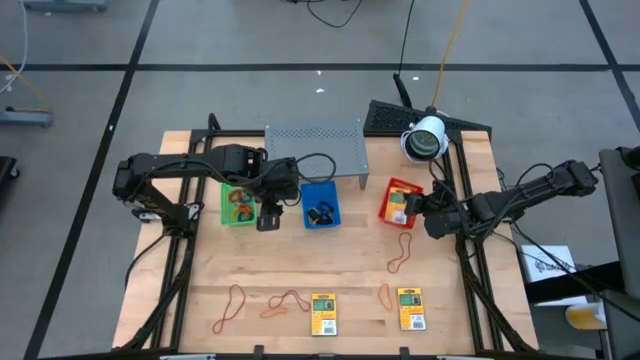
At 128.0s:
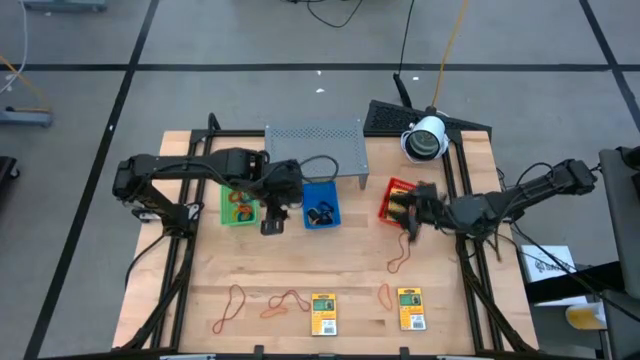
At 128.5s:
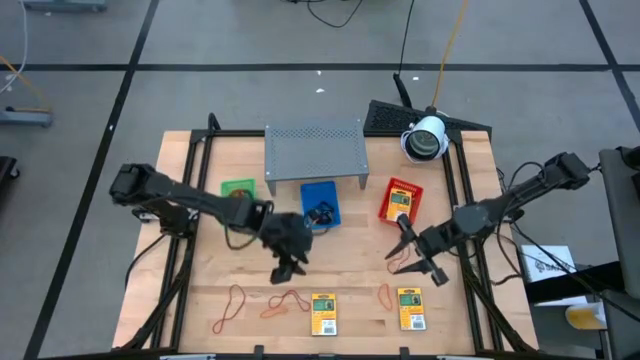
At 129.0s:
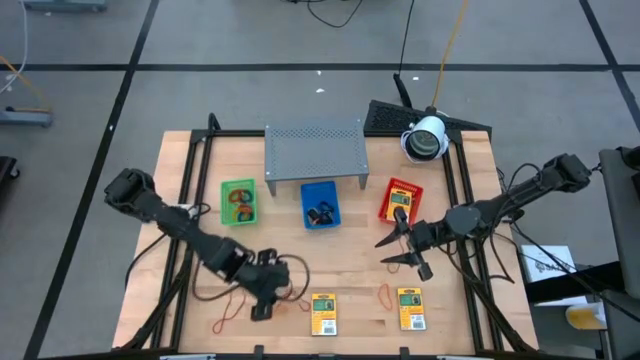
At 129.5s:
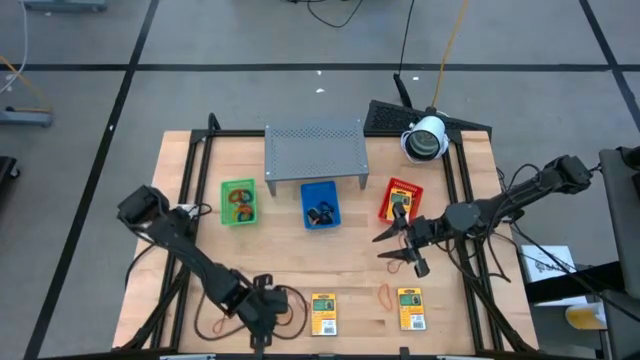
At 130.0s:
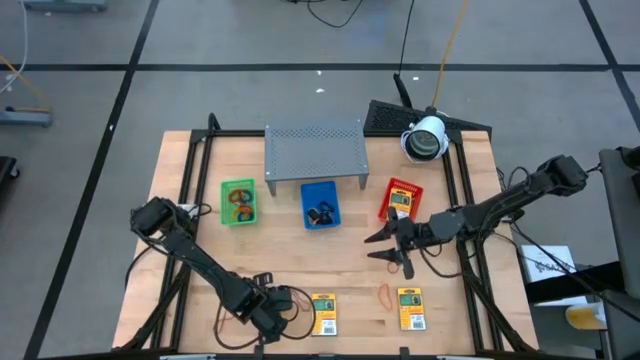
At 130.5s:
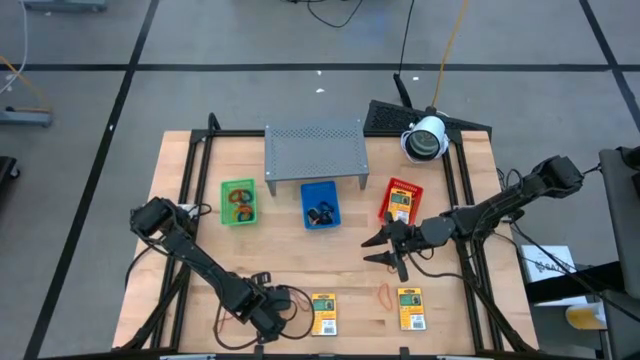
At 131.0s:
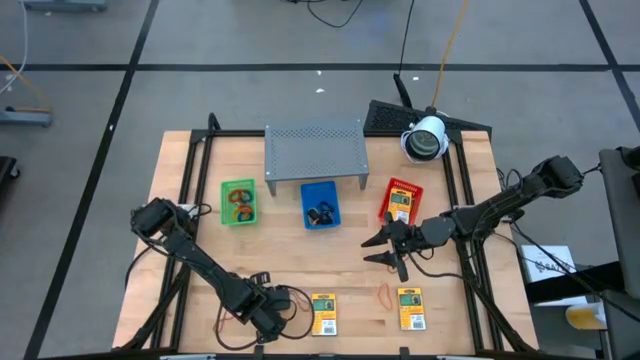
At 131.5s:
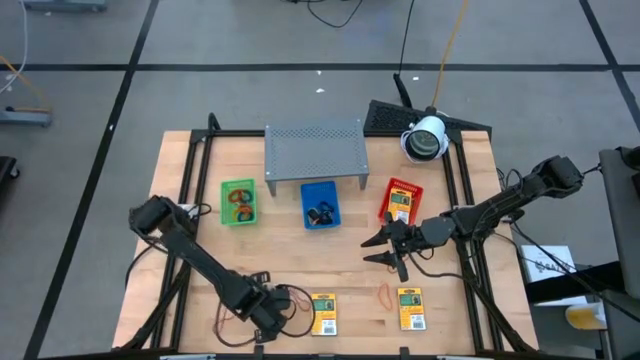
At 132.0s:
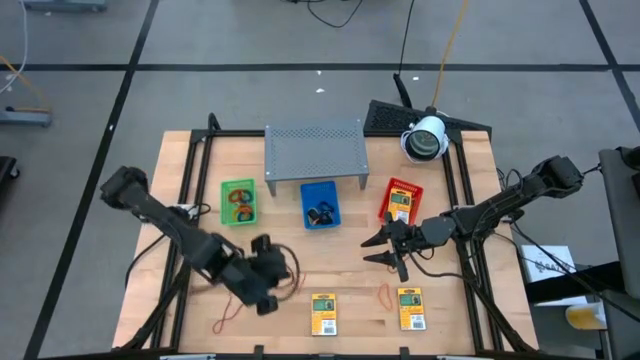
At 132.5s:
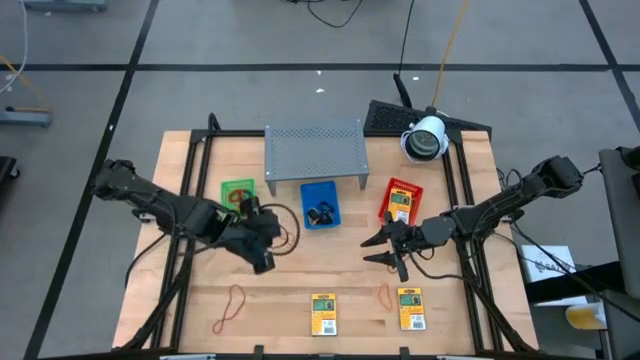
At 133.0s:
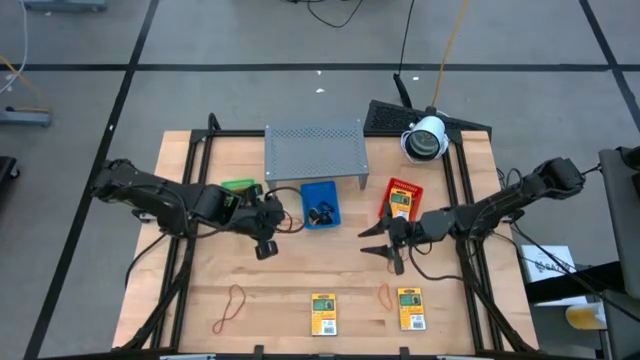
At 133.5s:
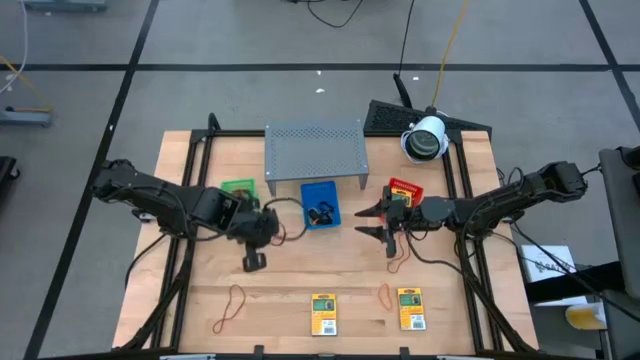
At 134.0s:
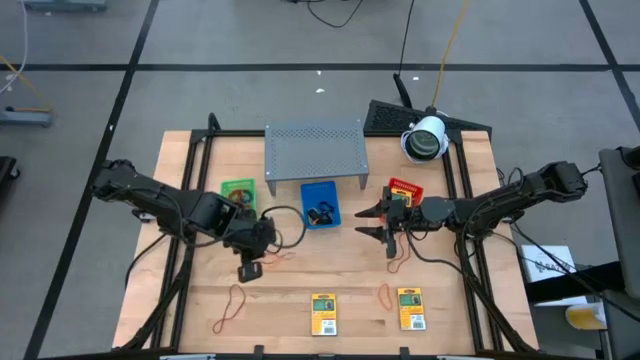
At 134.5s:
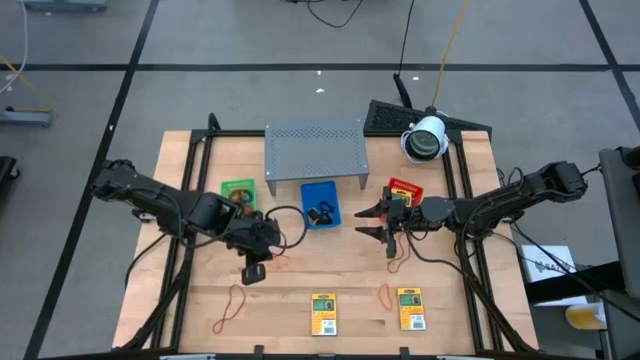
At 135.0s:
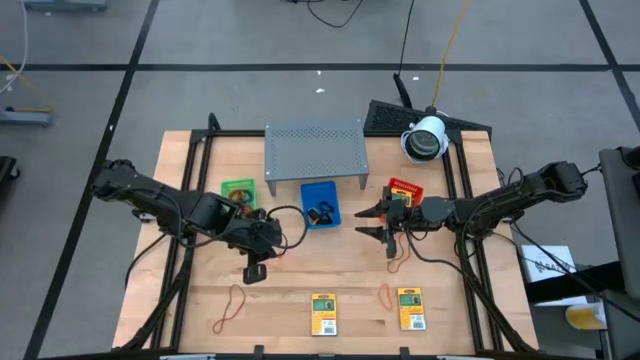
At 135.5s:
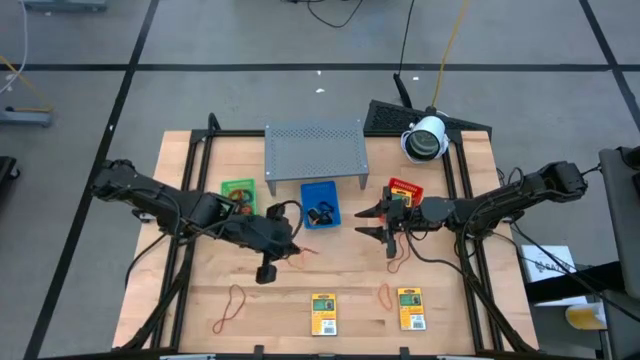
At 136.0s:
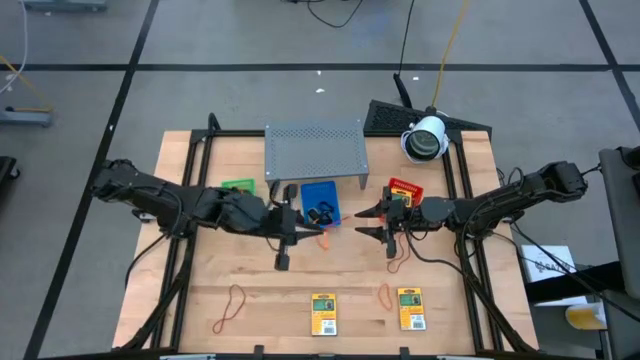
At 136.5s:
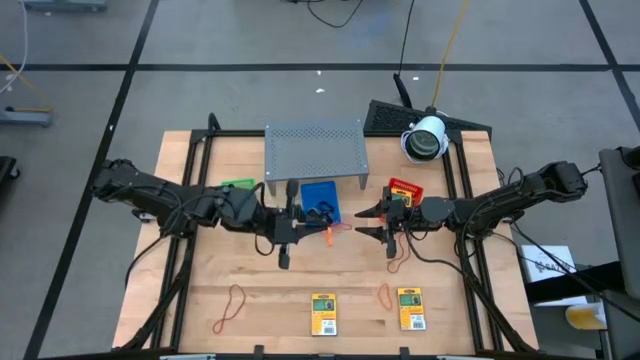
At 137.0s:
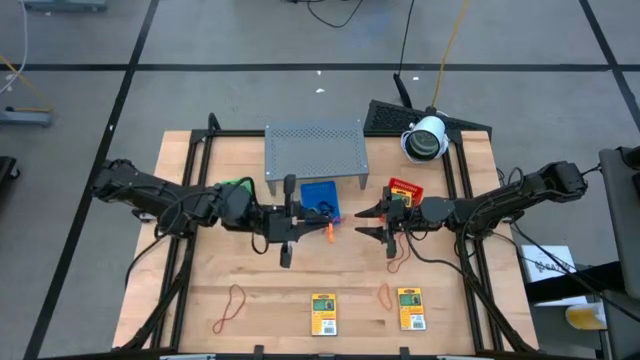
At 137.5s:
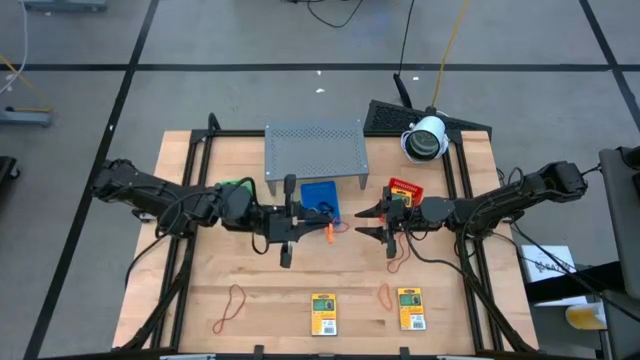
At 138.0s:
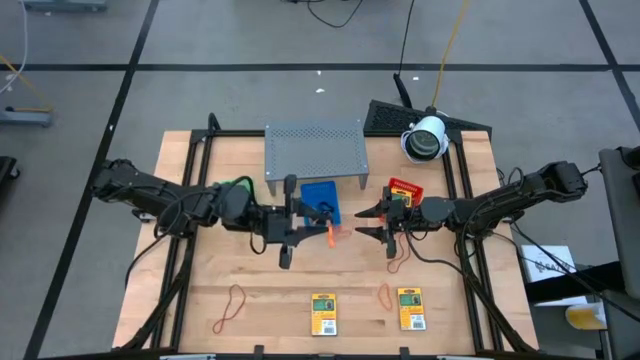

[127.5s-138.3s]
Task: Pick & Place Office Desk Supplies
Put the orange rubber band into the blue bin

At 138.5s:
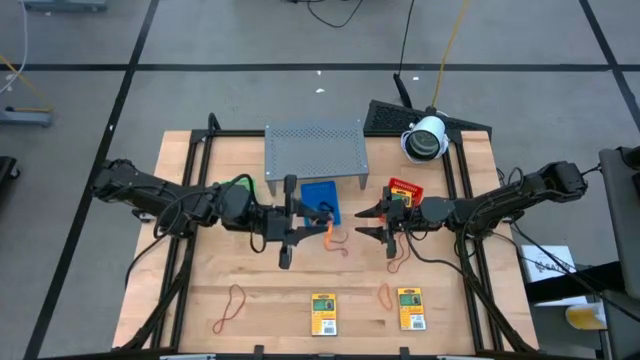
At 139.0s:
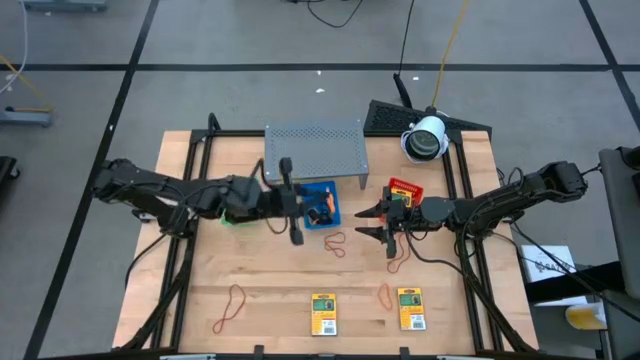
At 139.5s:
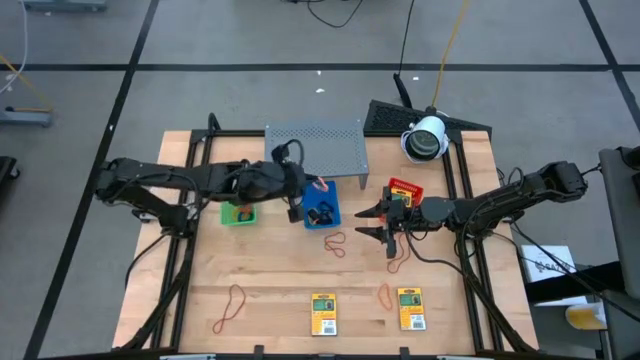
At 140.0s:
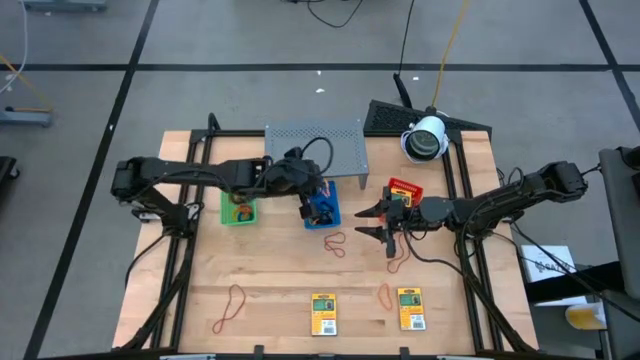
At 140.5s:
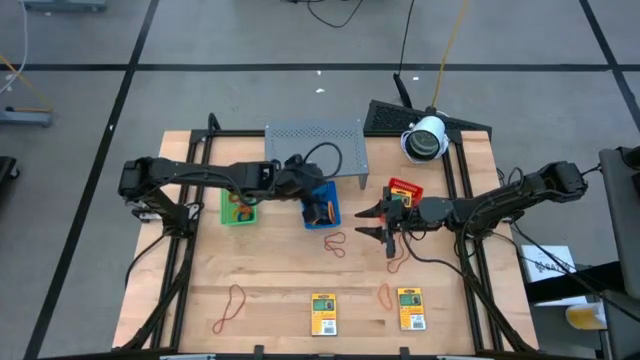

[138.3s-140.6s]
Put the orange rubber band into the blue bin

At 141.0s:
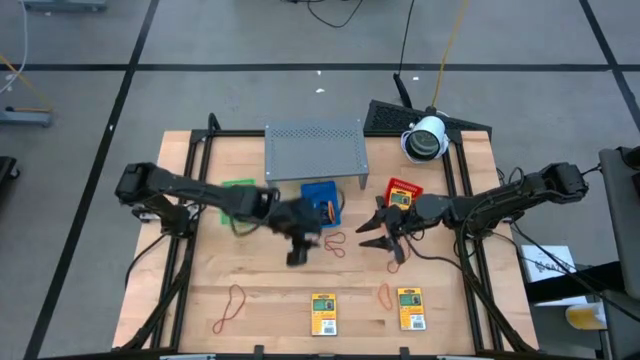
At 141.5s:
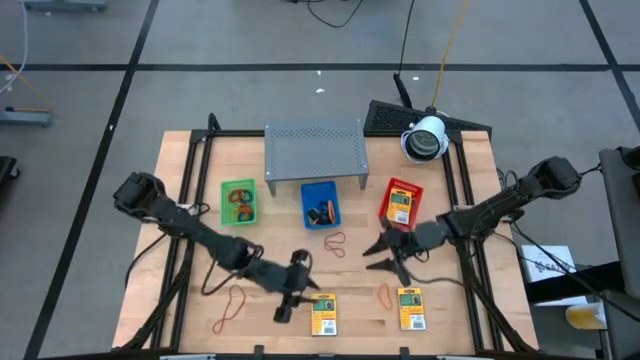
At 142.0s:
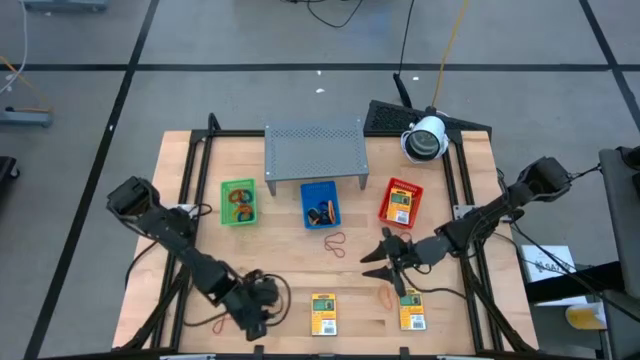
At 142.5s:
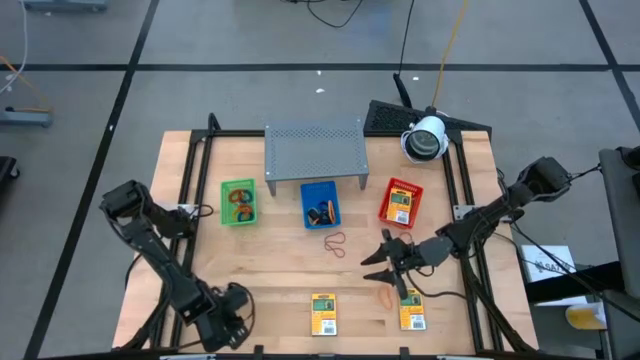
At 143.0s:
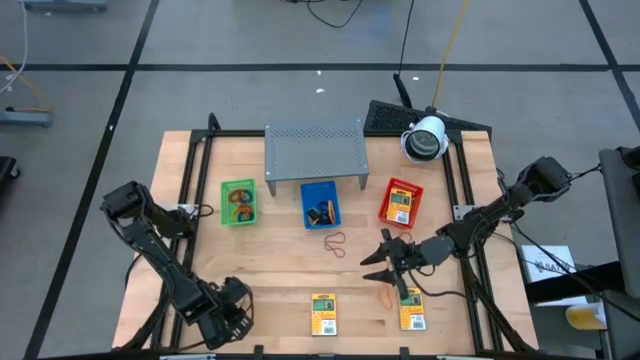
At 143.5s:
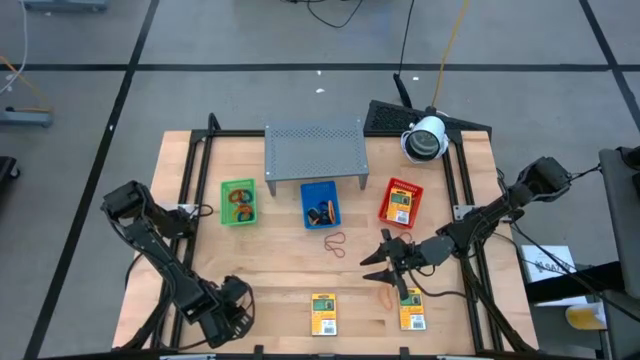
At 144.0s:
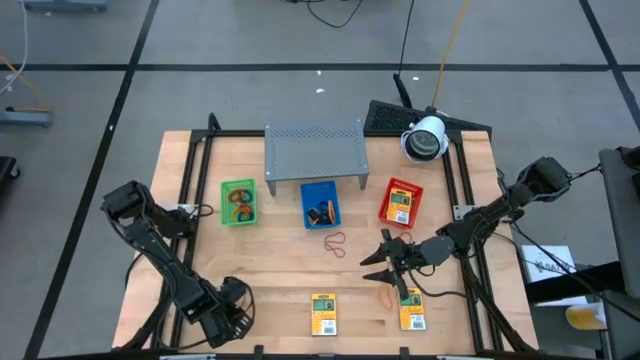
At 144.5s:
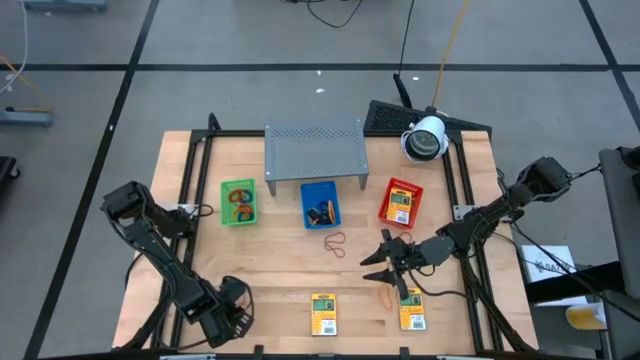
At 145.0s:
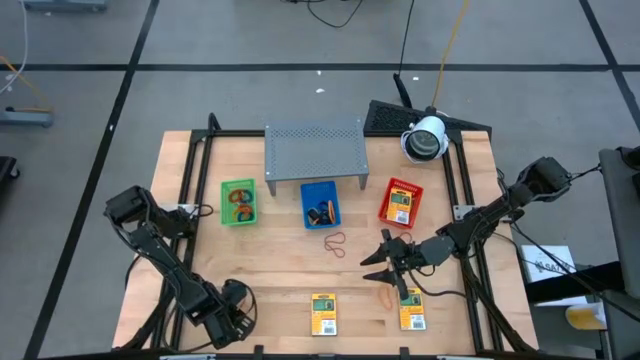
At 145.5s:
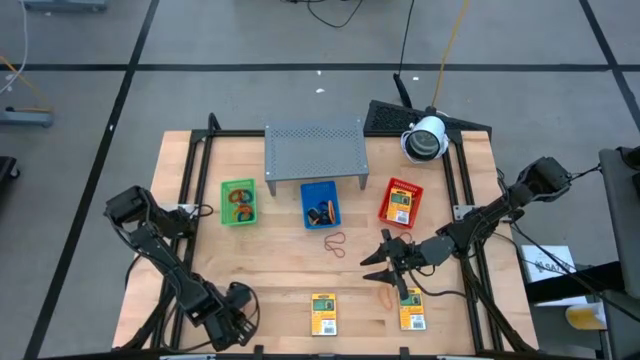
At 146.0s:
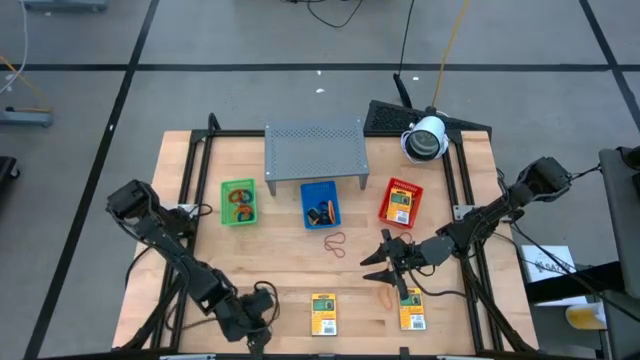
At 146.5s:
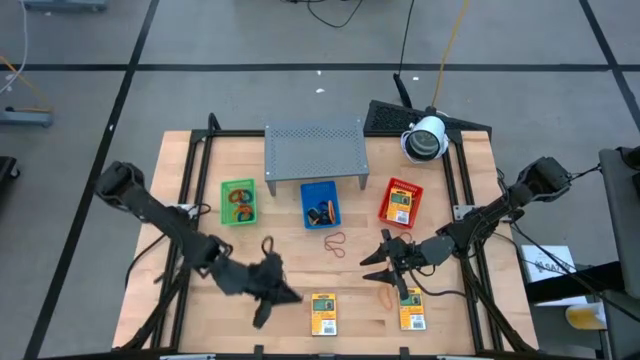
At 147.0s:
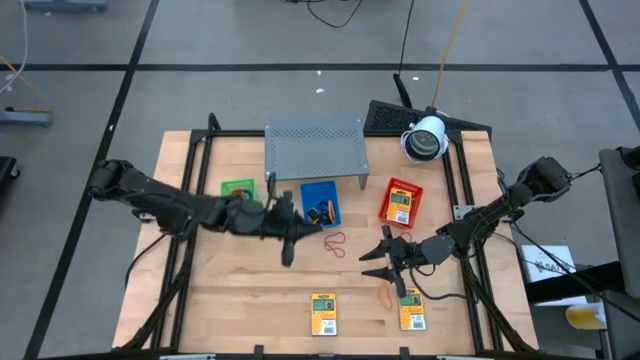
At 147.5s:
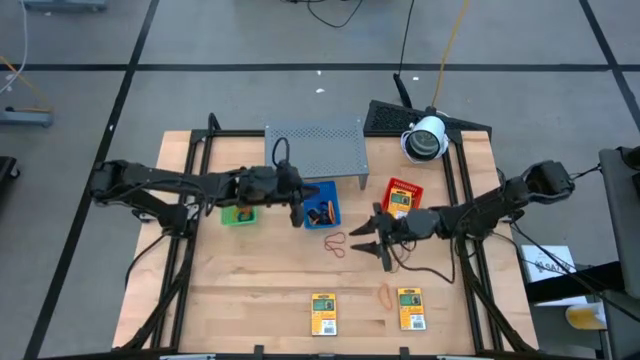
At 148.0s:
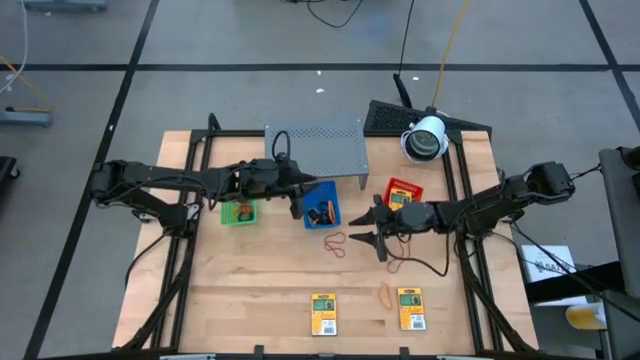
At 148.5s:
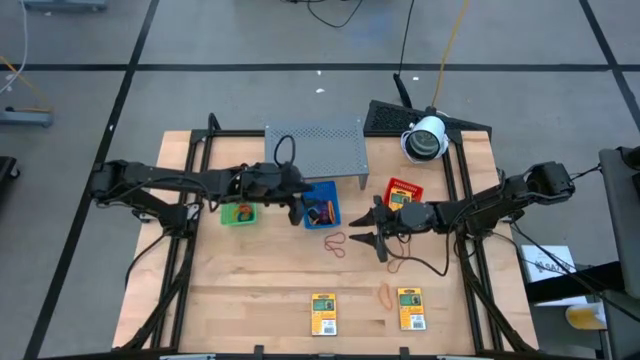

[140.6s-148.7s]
Put the red rubber band into the blue bin
